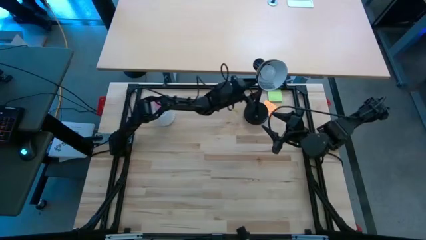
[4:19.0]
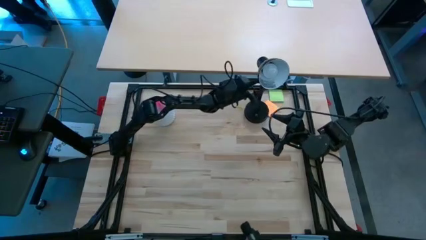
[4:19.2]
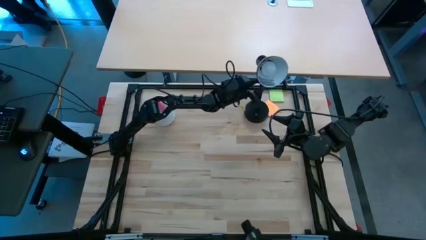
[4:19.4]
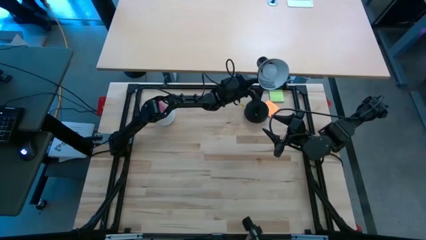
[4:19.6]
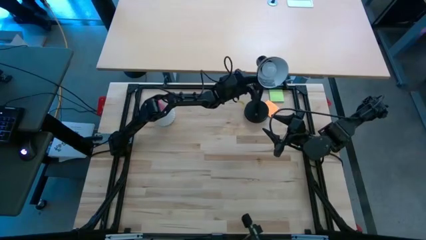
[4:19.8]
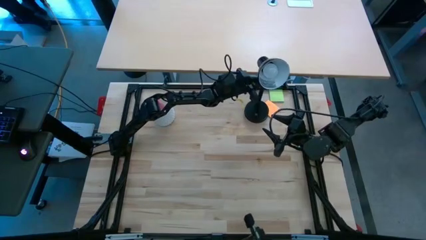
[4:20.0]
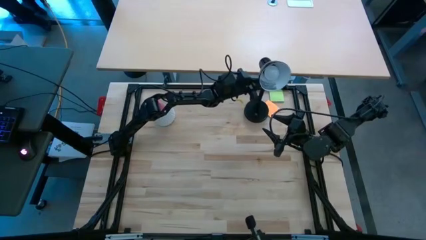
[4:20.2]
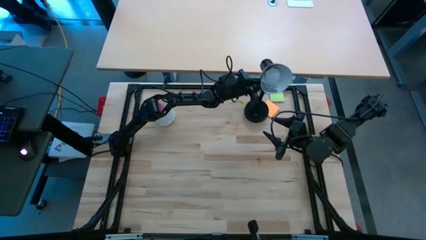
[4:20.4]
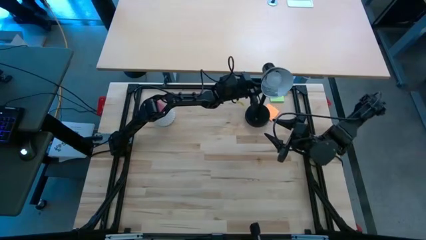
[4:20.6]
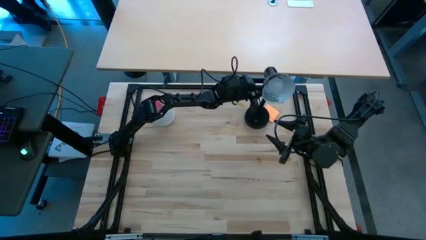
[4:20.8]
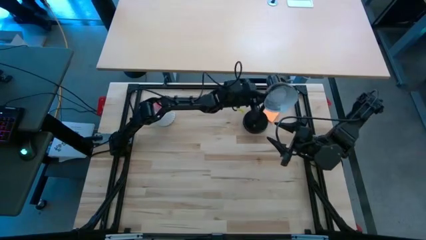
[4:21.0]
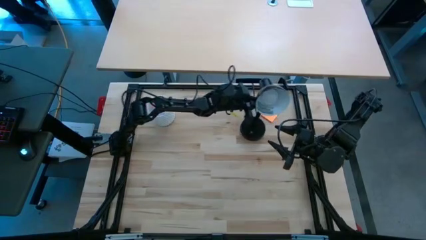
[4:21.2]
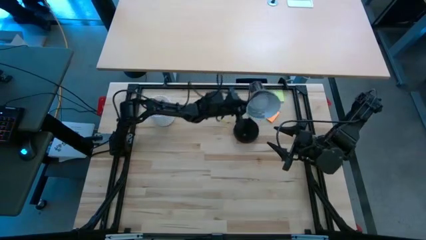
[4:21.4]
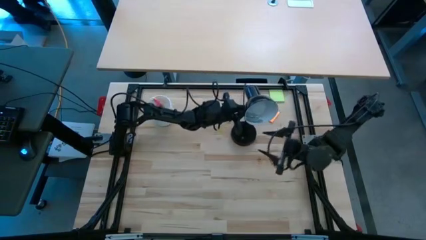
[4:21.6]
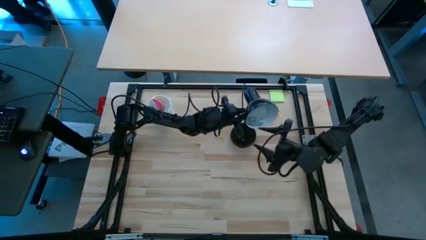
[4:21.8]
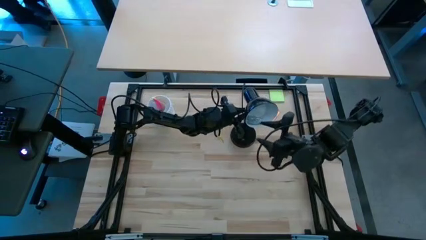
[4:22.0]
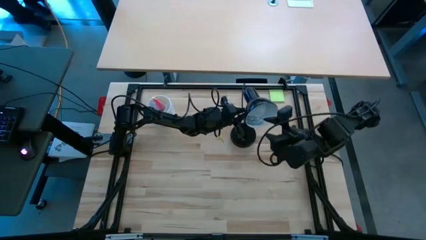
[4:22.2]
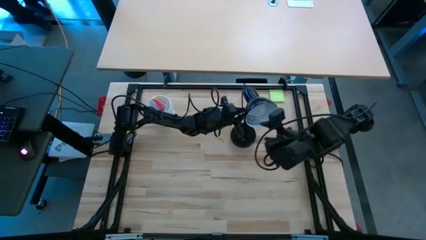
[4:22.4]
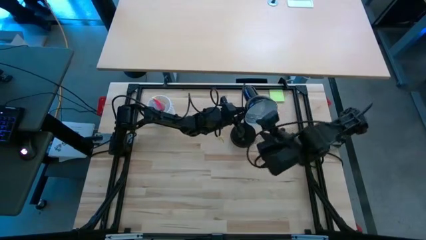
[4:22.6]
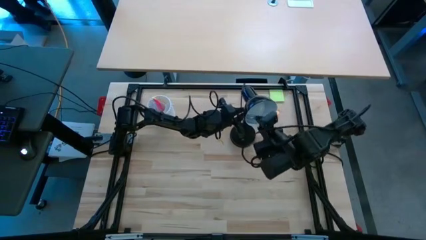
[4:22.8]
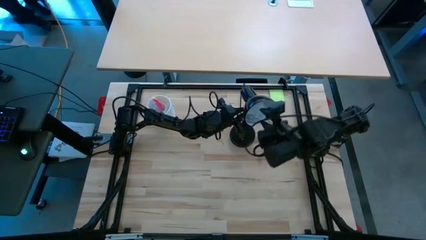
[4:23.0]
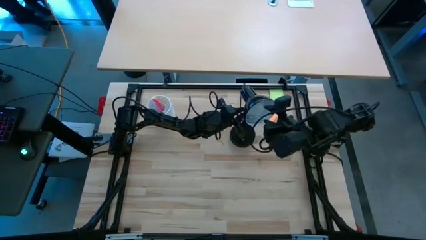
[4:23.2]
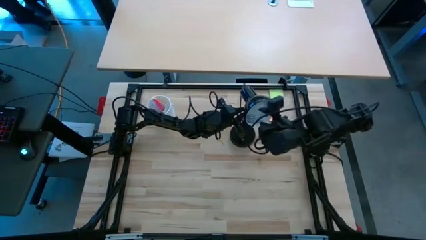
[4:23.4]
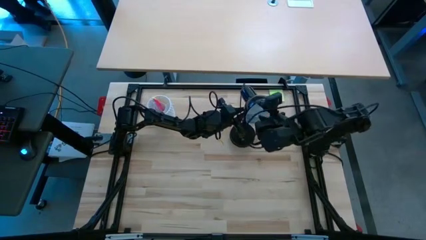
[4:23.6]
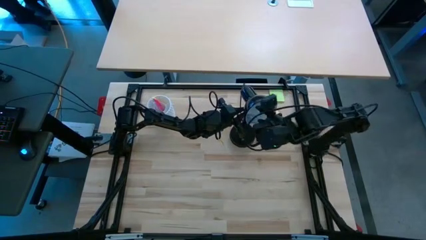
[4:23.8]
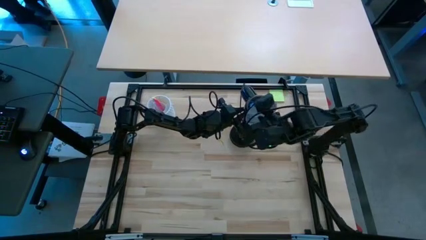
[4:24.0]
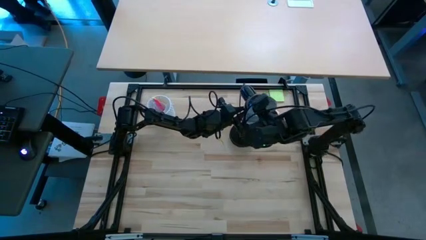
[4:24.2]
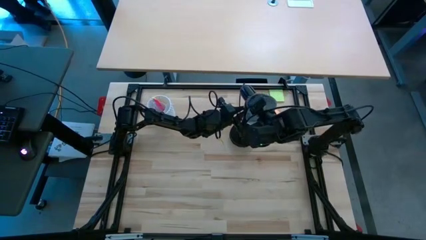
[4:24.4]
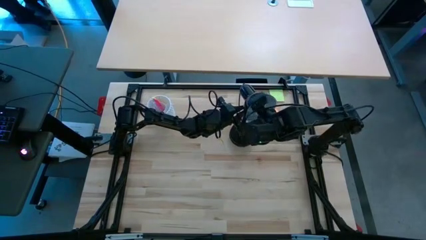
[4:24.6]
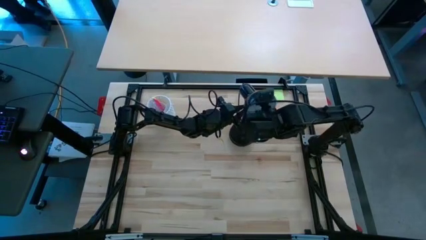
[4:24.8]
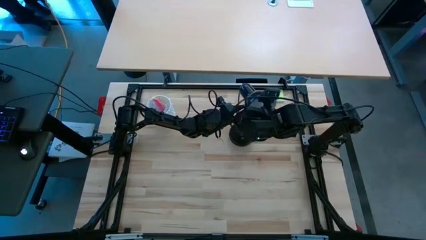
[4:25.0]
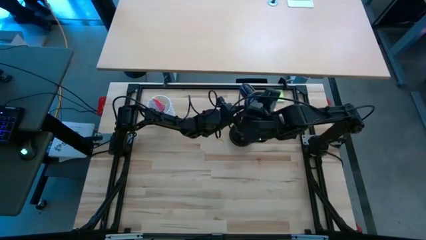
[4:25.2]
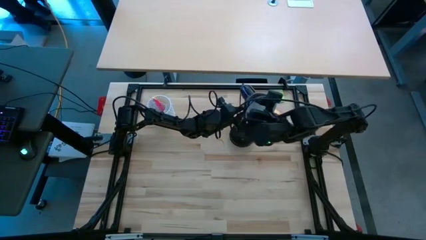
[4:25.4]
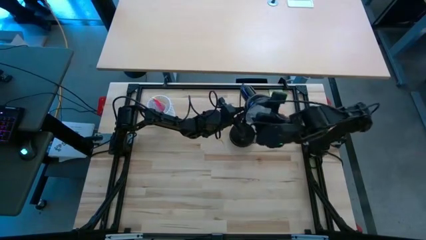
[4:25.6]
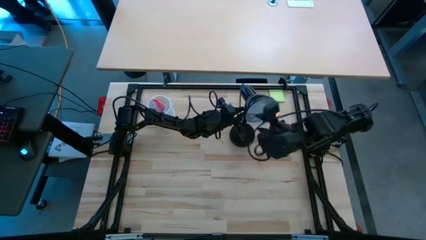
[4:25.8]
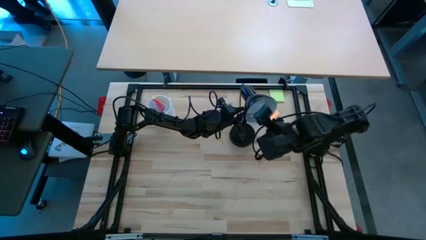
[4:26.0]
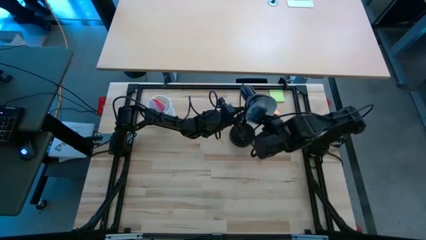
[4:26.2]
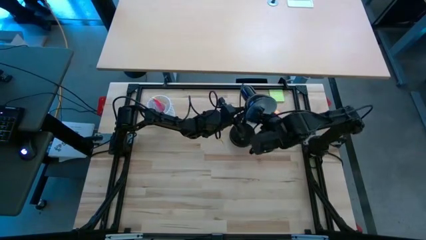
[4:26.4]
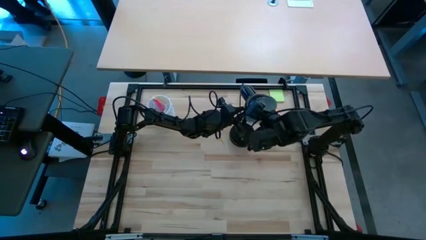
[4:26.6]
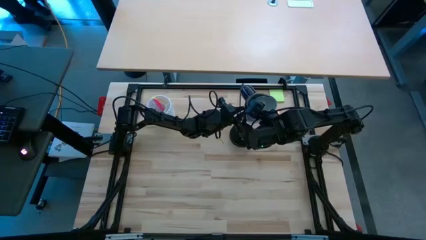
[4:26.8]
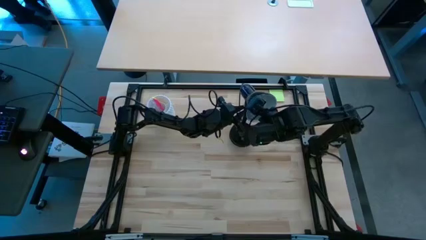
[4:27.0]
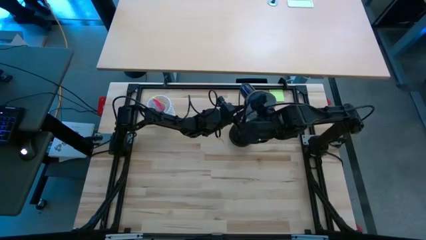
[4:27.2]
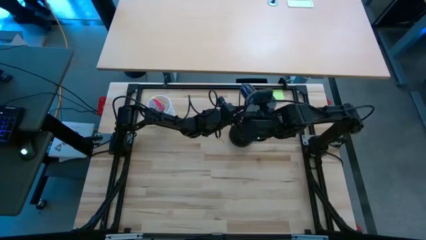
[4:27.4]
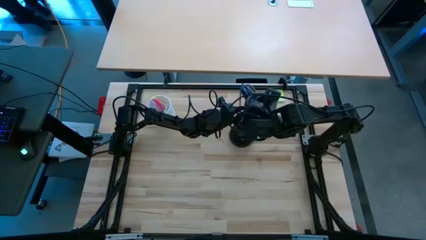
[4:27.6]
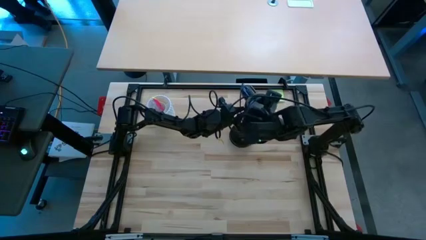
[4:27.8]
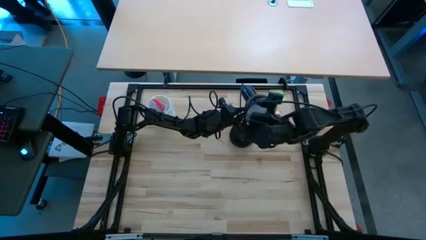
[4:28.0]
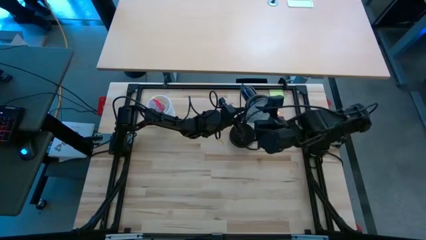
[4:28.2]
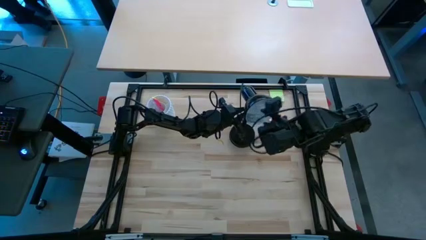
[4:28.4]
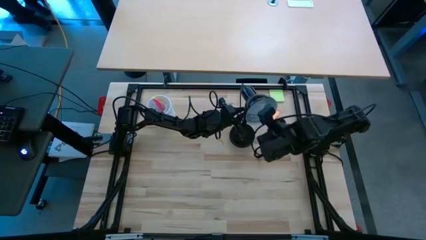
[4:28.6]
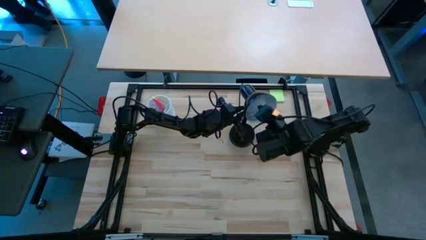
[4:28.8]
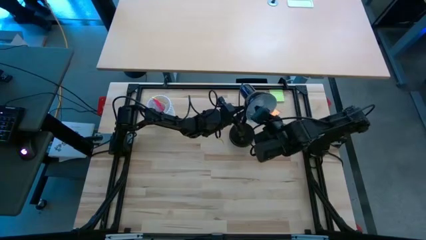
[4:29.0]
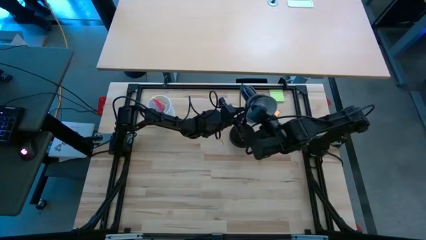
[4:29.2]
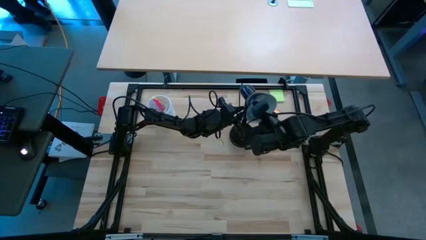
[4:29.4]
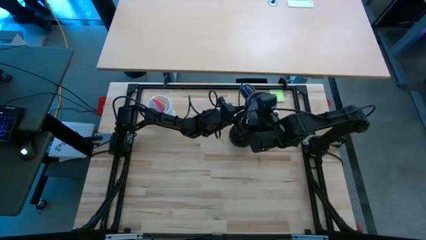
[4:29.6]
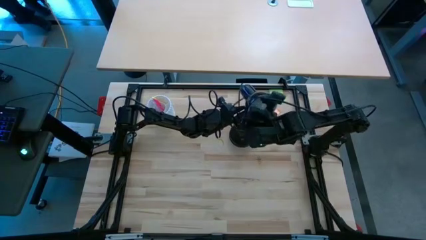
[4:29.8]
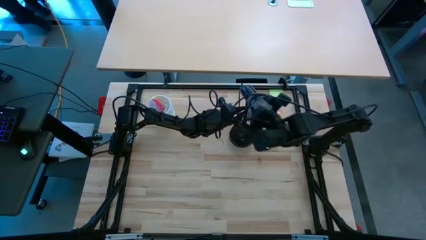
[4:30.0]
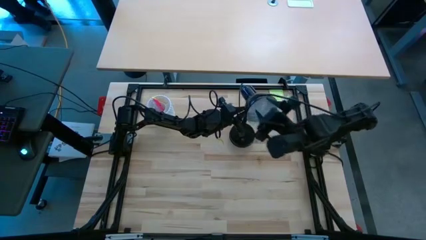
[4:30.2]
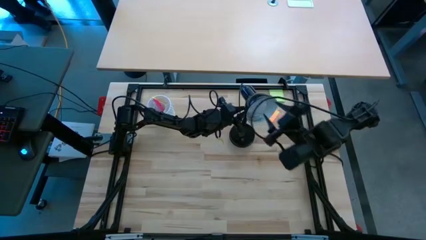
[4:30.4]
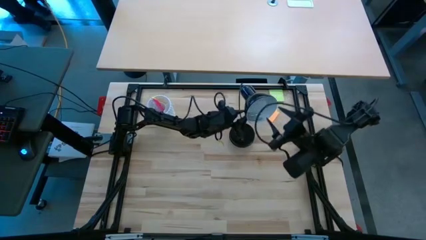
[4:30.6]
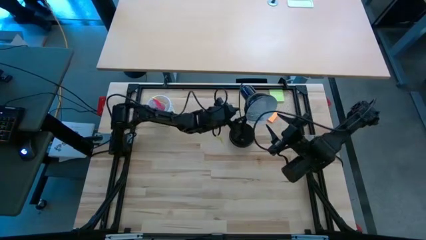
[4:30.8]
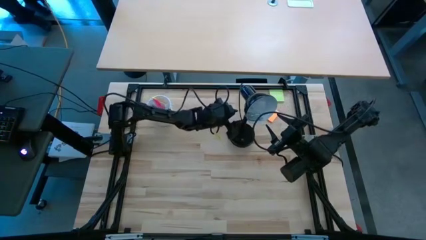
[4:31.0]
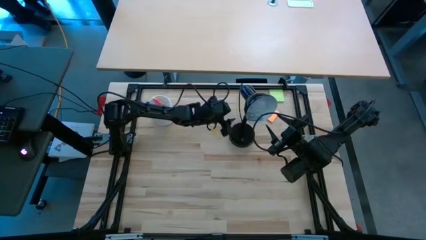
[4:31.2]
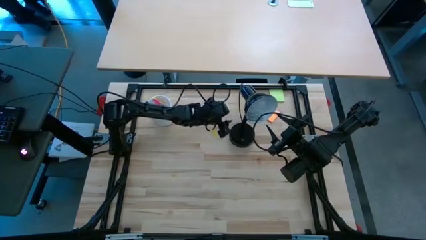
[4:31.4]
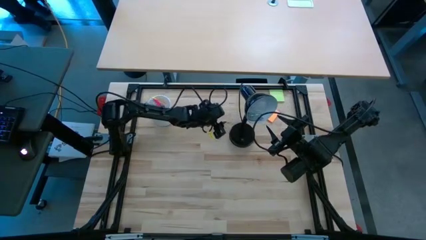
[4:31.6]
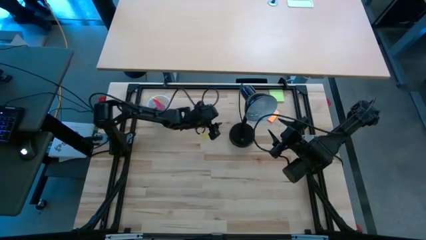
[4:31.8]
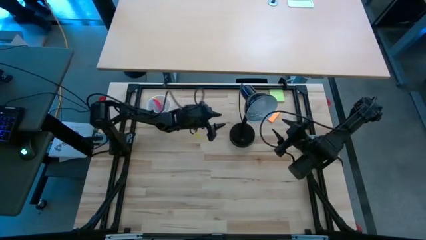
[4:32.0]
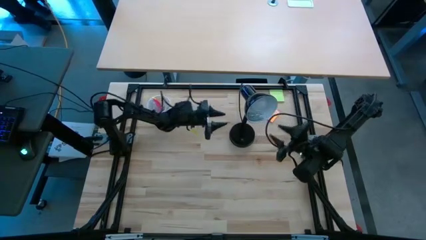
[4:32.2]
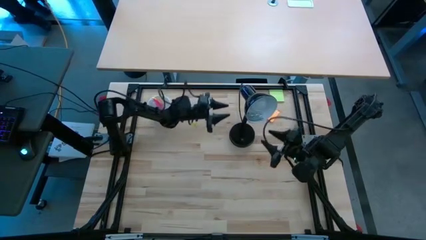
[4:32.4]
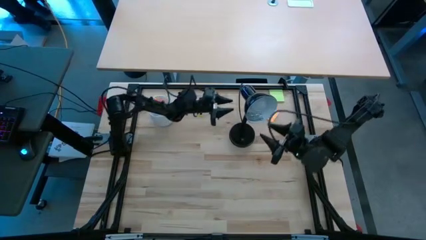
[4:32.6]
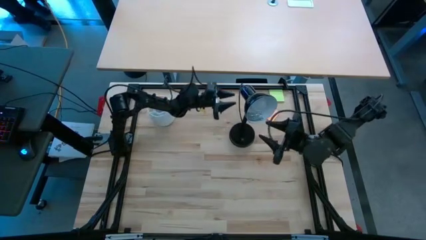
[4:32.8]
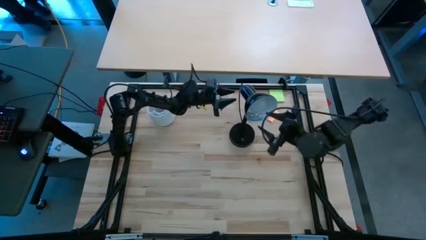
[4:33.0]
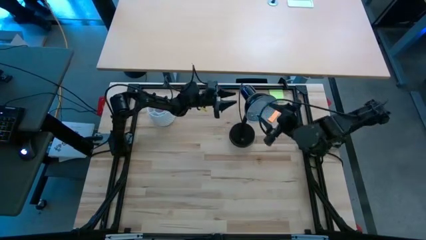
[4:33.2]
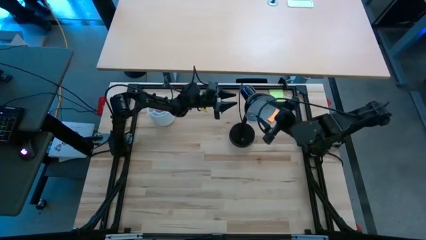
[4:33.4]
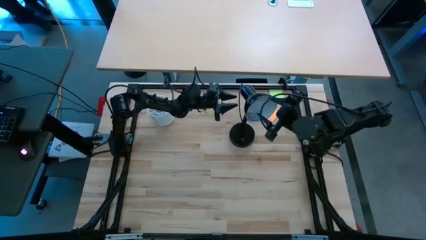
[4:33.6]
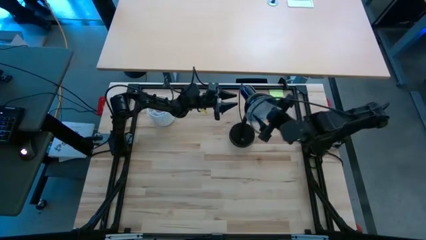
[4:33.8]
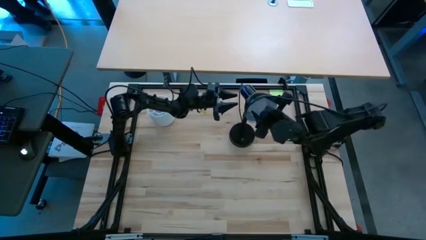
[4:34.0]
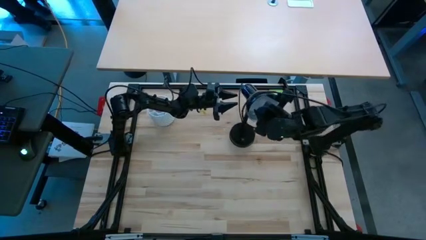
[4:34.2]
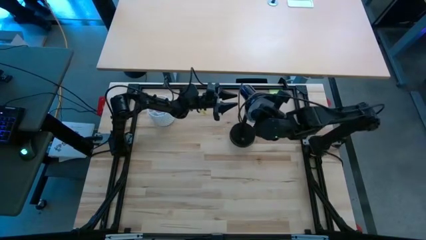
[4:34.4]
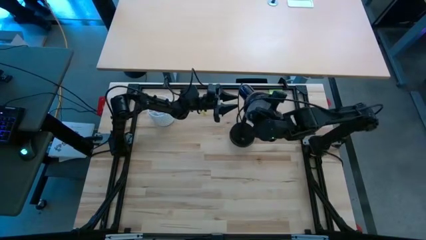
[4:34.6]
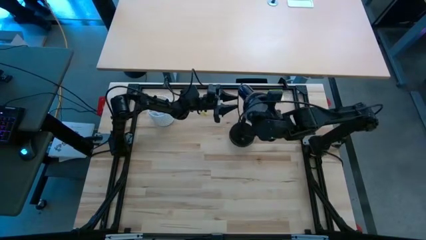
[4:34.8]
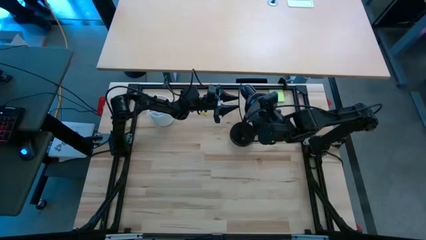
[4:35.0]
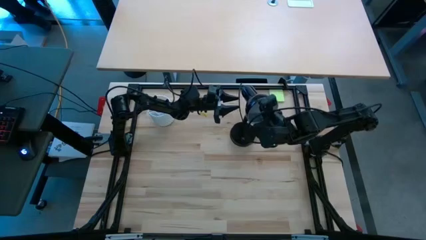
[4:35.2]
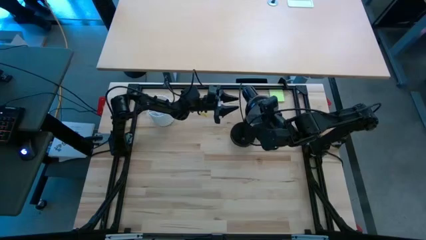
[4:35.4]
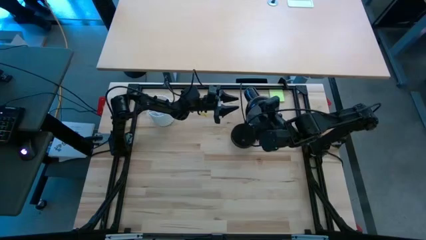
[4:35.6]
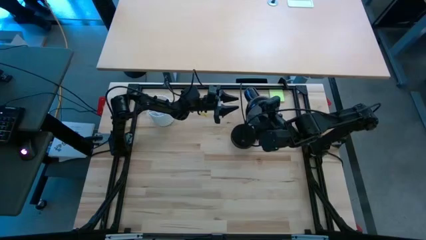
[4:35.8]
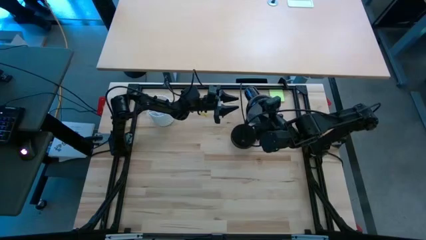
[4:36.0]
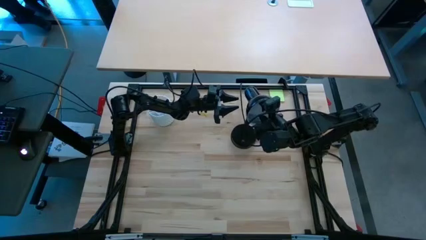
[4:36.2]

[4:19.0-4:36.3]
Task: Screw lightbulb
Insert the light bulb into the desk lamp
